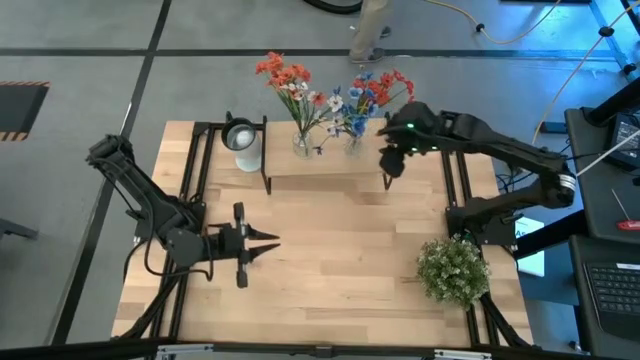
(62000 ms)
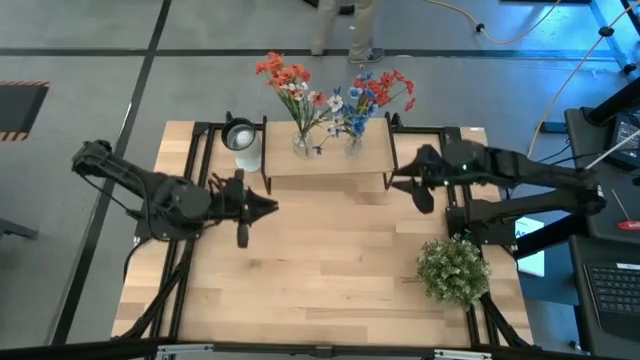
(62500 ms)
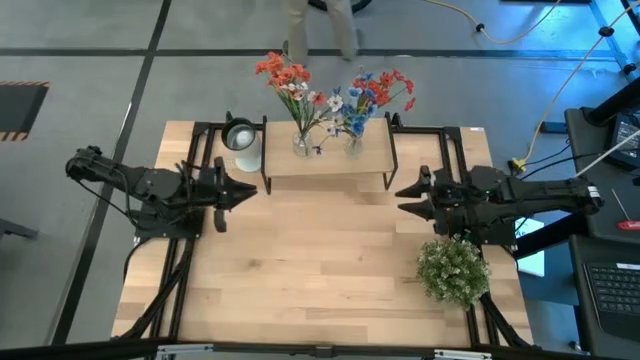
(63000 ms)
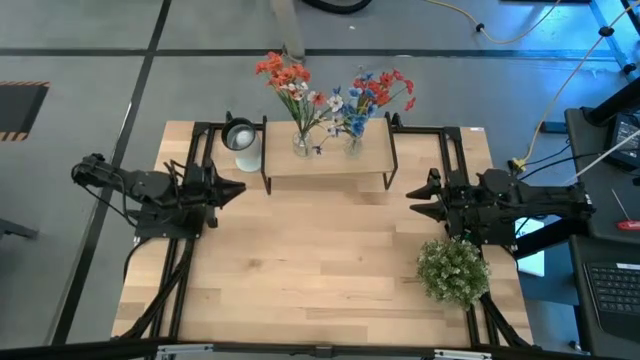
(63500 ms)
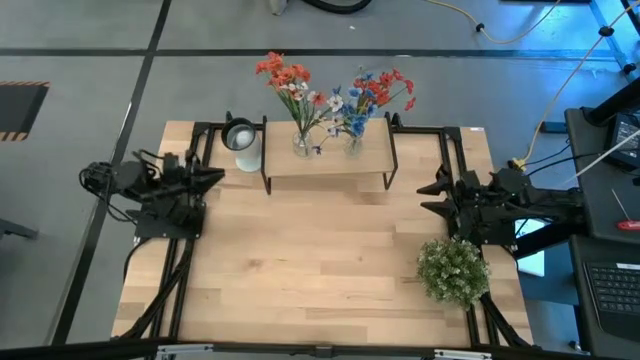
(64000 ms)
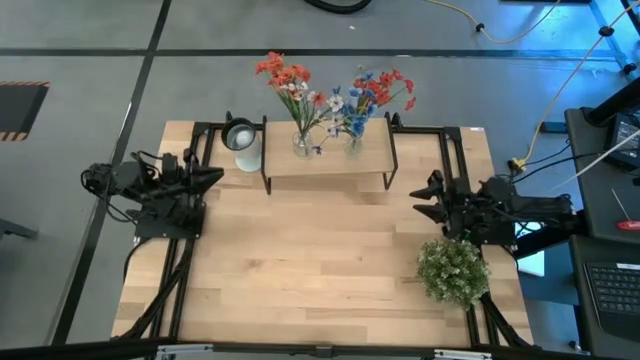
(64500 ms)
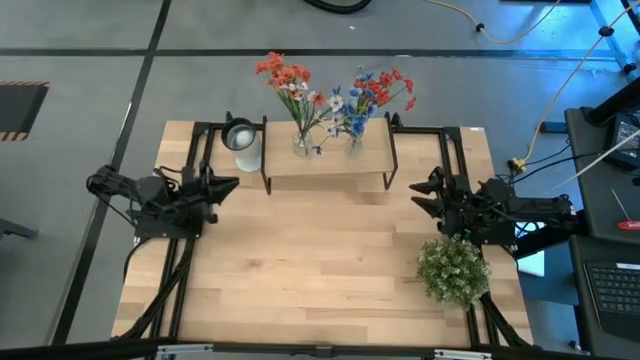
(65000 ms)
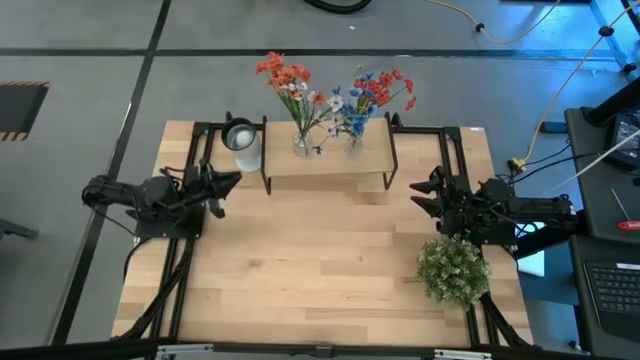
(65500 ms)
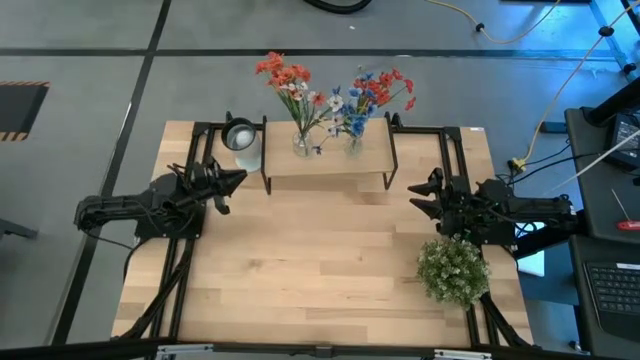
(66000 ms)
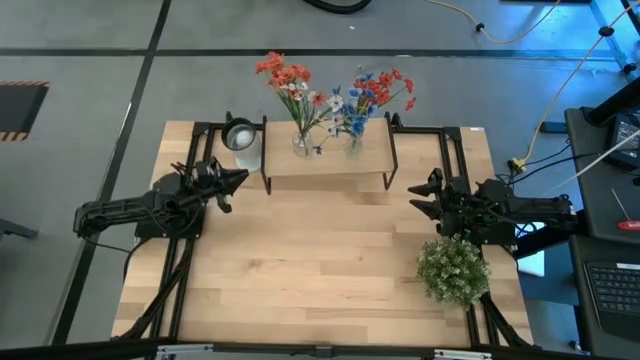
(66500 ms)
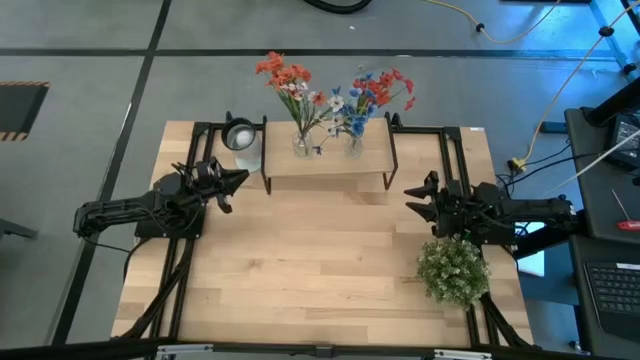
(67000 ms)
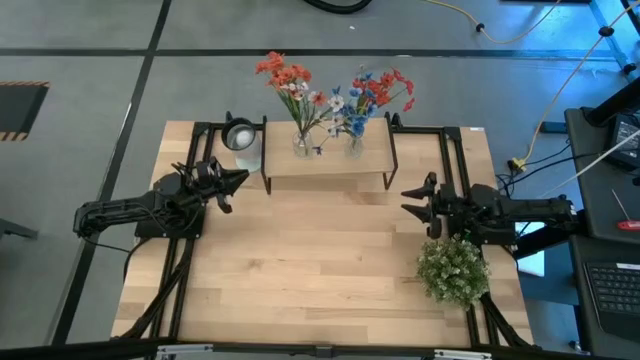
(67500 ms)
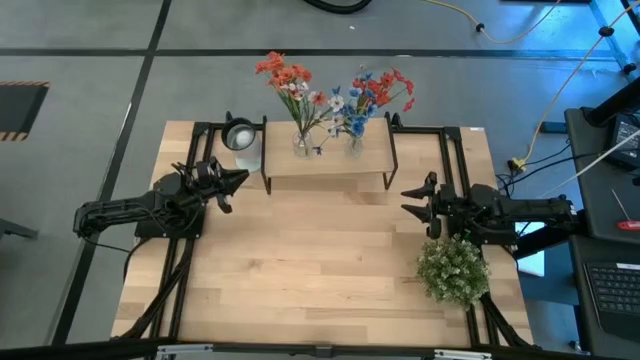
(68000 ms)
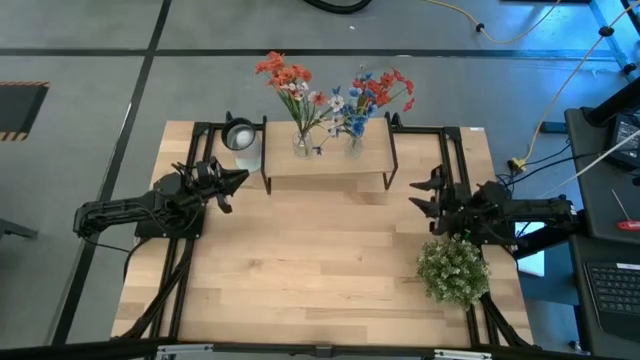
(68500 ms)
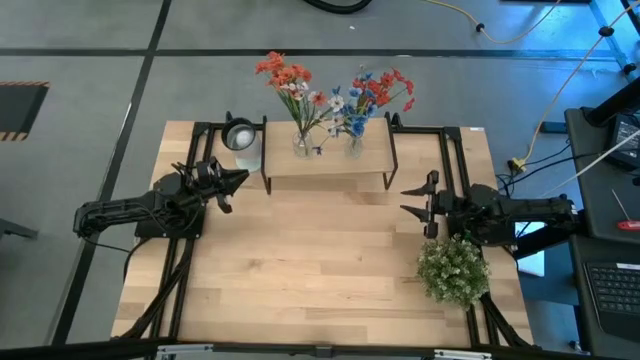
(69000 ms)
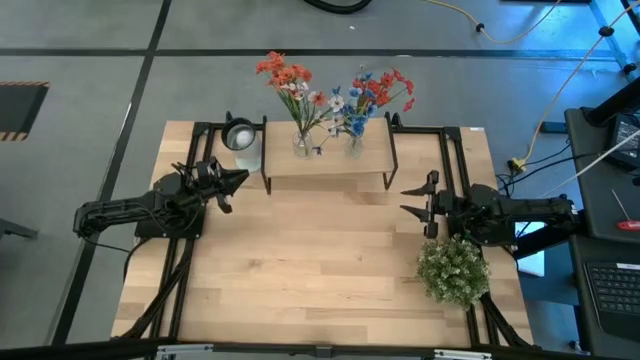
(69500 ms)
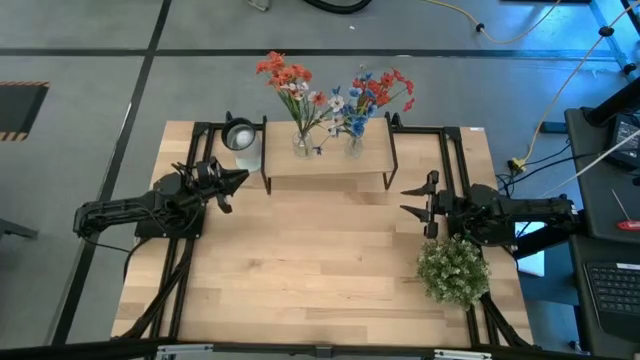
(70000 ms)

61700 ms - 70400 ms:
Task: Pick and place flowers into a vace then onto a shelf
Return to Home Position

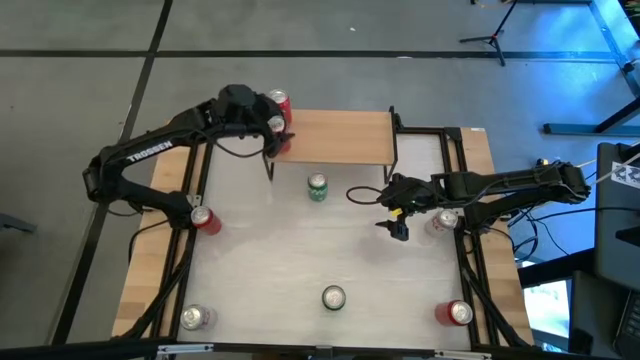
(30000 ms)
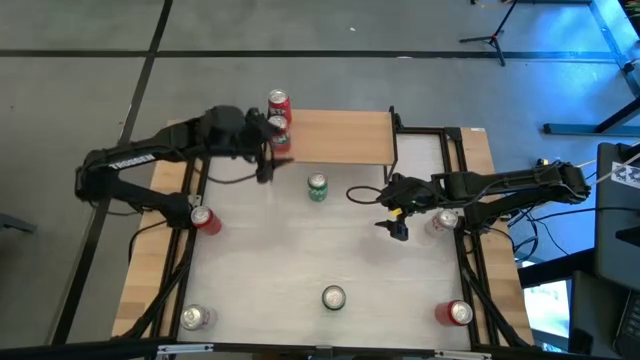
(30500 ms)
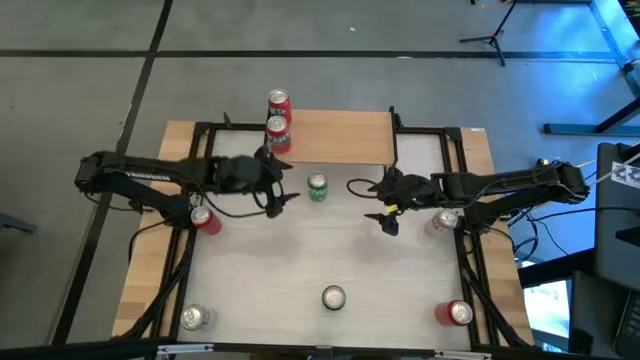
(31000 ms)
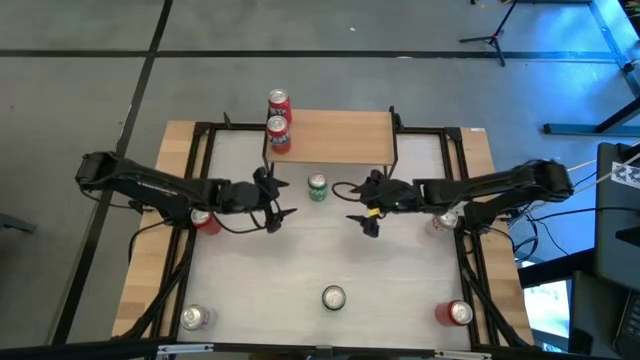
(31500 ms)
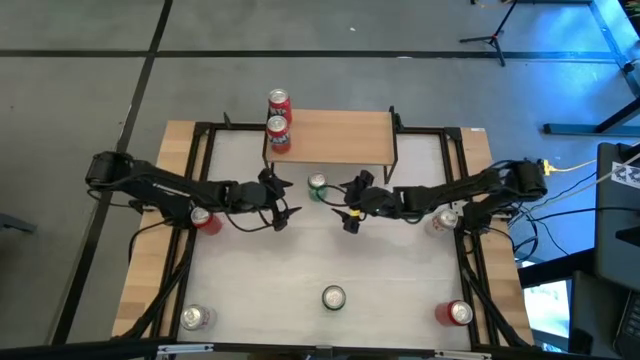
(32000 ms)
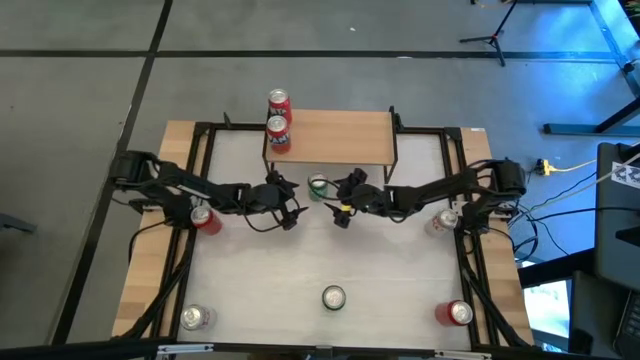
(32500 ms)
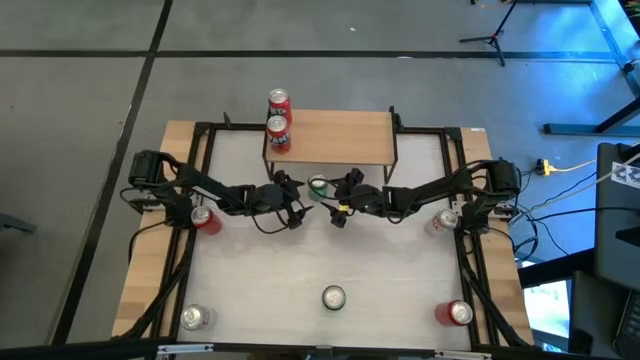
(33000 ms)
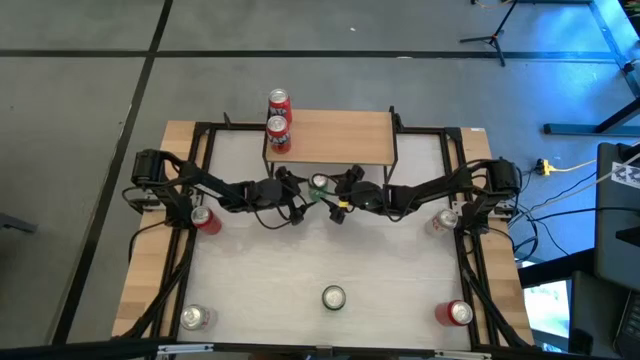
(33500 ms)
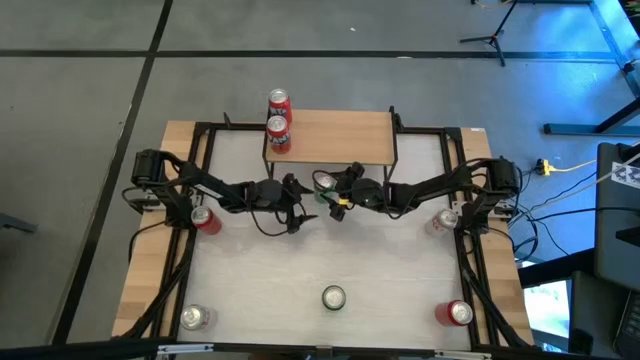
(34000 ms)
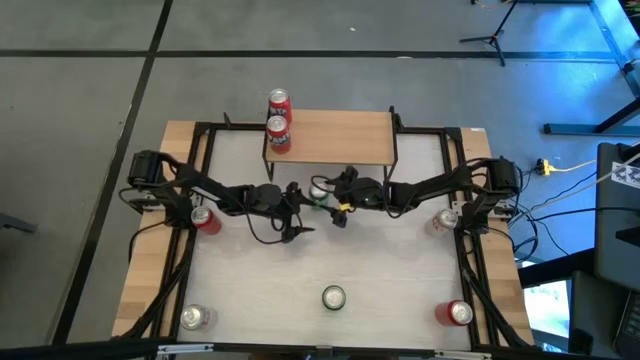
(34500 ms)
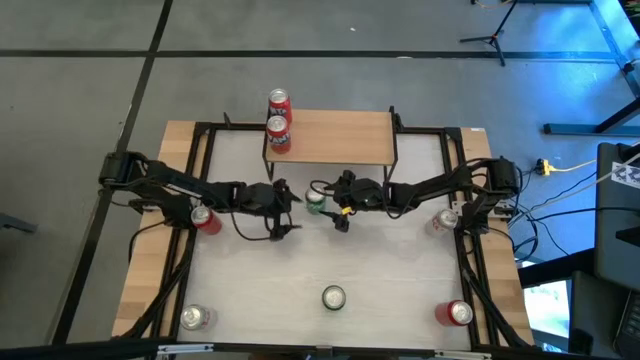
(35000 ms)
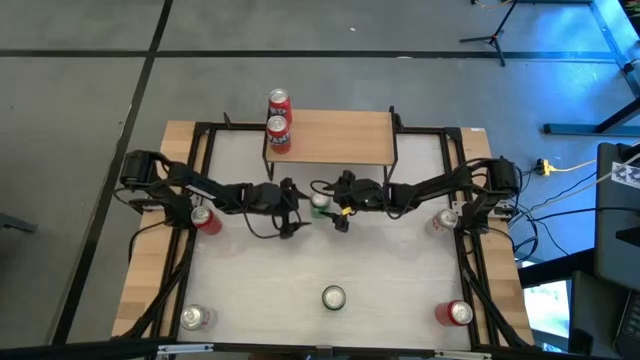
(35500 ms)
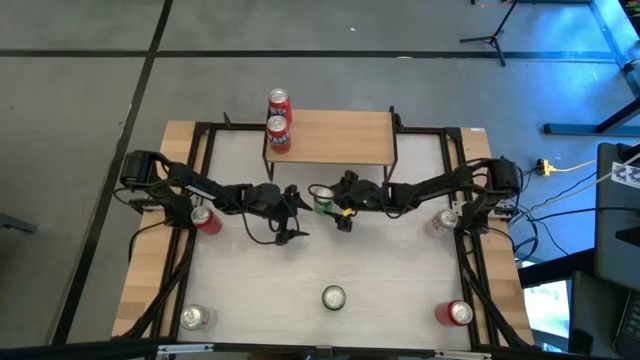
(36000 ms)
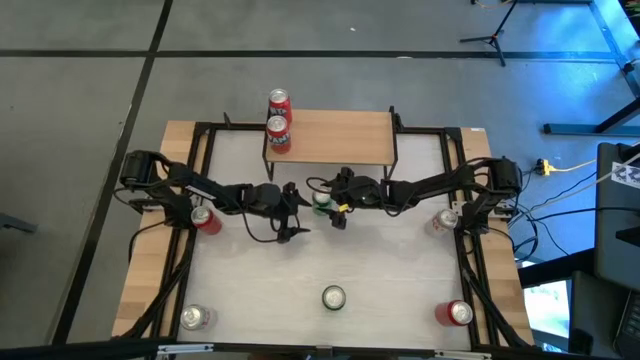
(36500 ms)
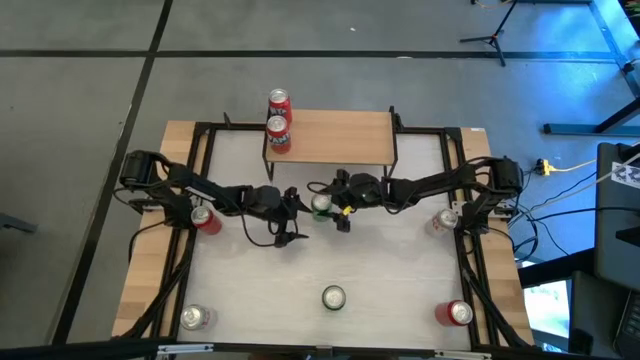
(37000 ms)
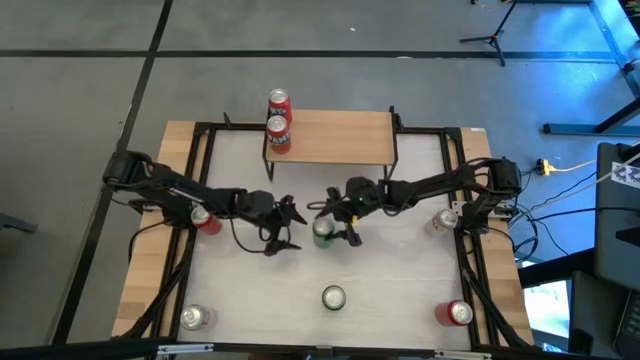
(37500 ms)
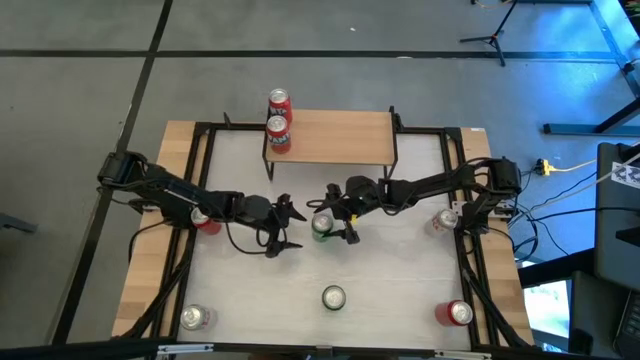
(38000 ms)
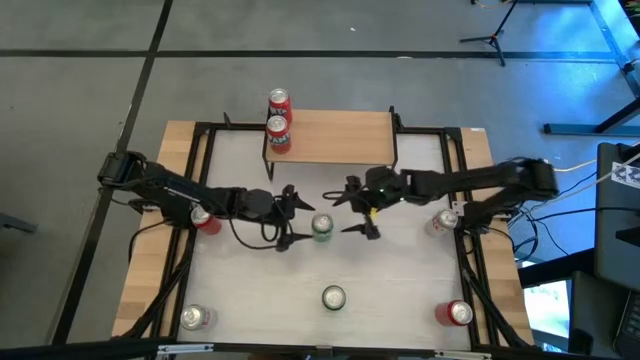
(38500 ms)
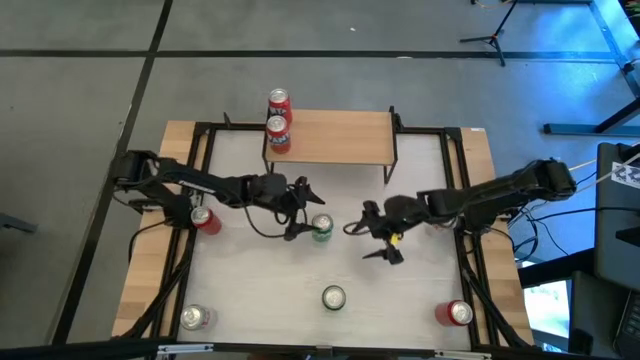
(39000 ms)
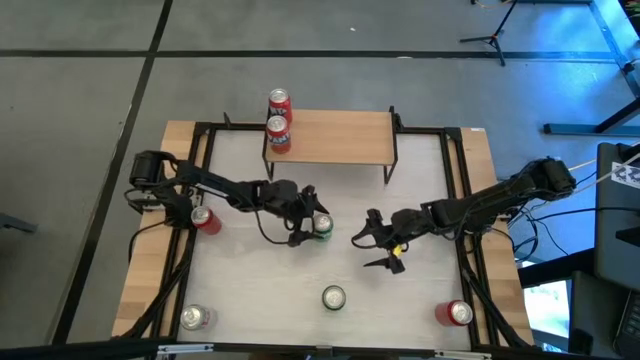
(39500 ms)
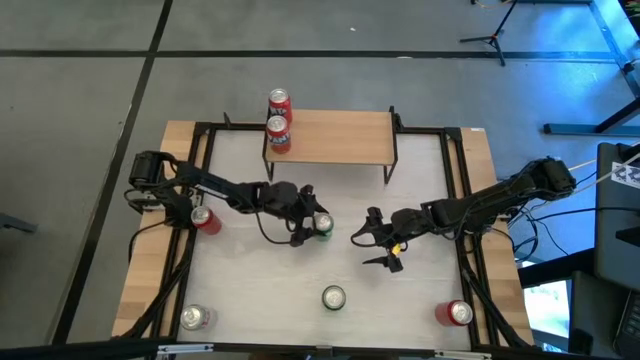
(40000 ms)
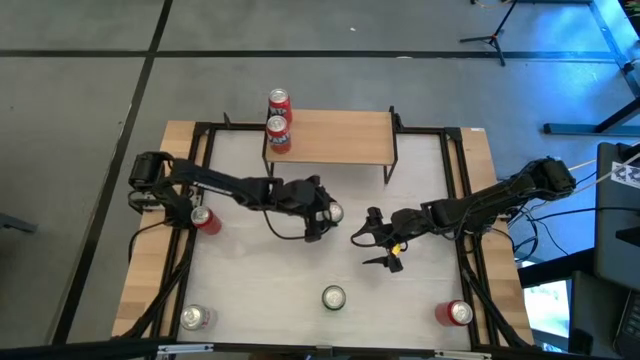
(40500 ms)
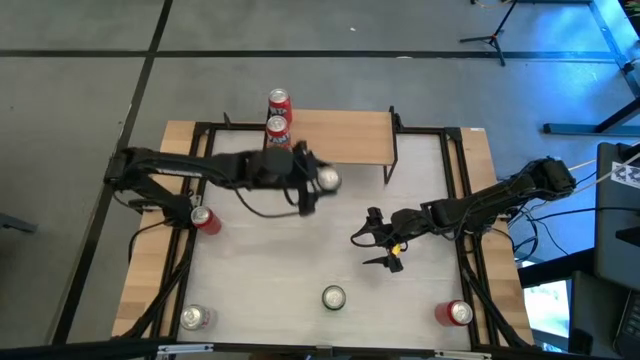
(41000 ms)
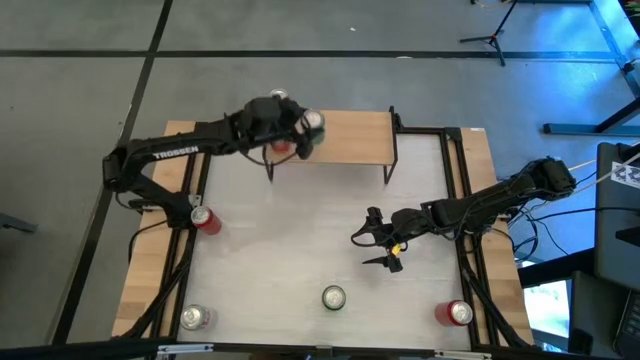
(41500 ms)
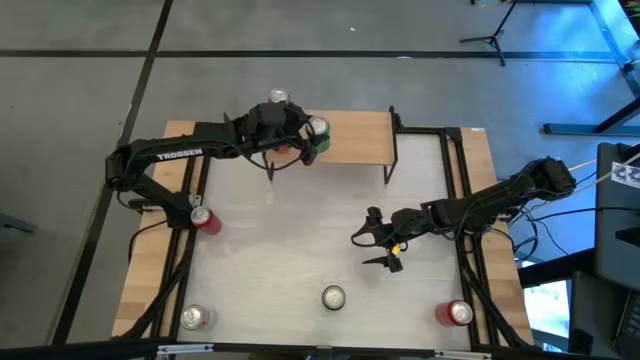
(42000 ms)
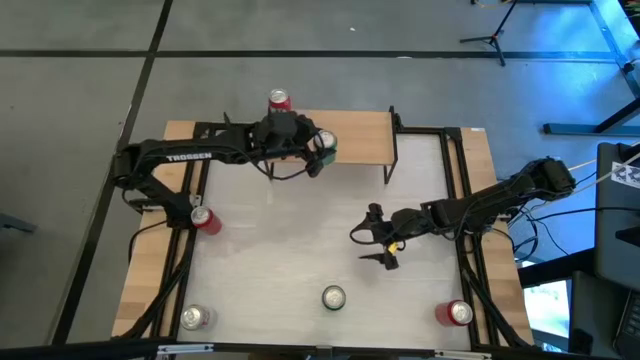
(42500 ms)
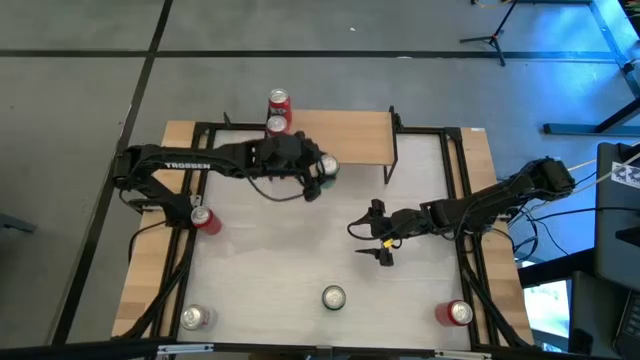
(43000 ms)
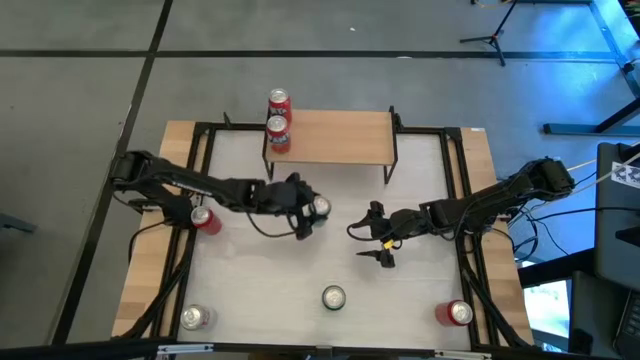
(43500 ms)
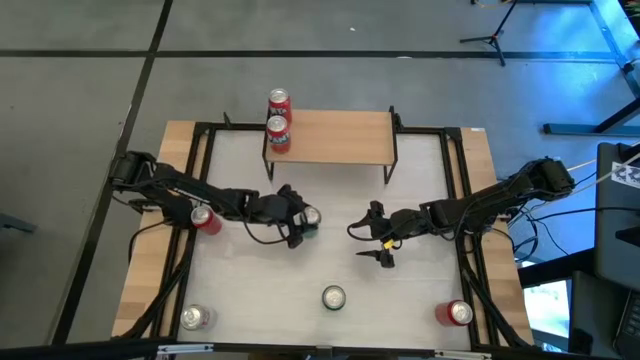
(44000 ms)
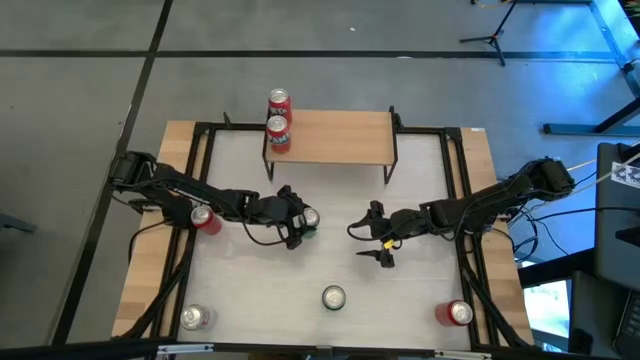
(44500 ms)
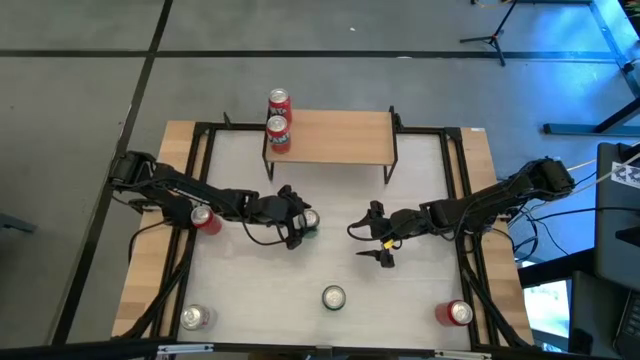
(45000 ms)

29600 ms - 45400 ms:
Task: Place canned beverage on shelf
Put the top green soda can on the shelf
